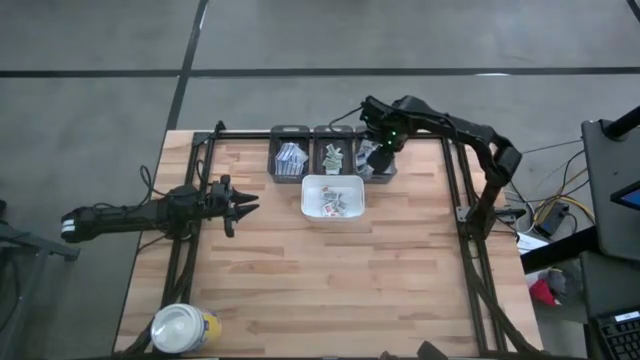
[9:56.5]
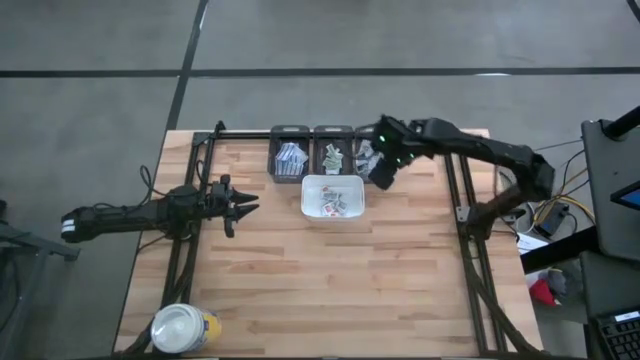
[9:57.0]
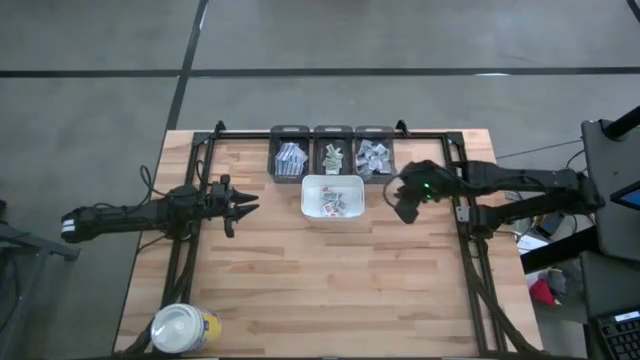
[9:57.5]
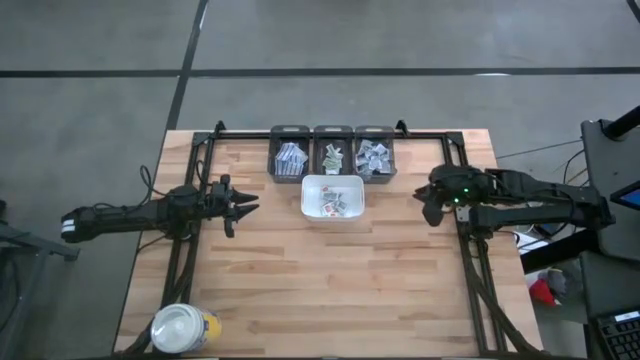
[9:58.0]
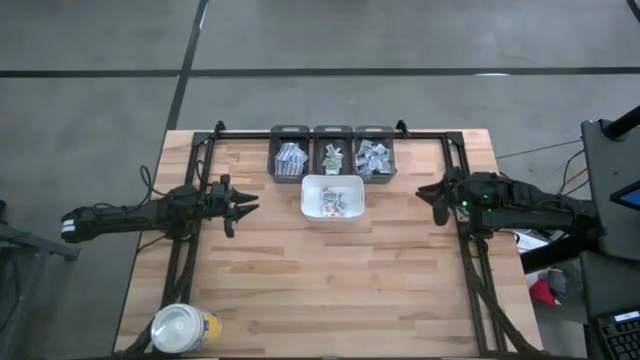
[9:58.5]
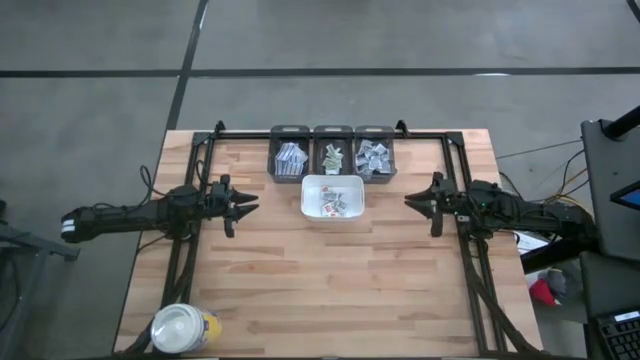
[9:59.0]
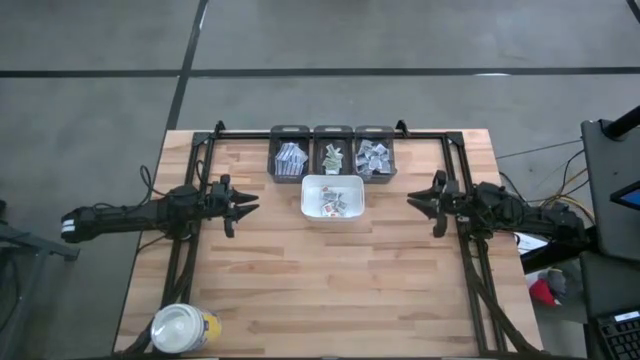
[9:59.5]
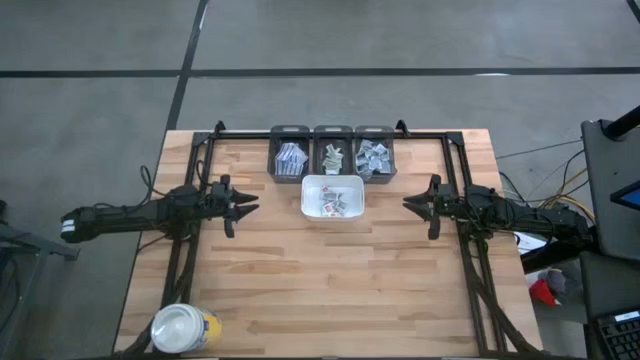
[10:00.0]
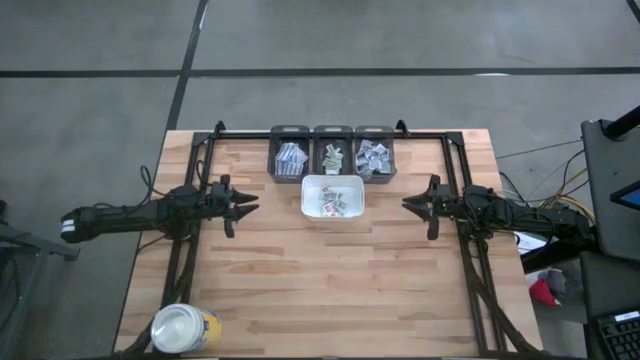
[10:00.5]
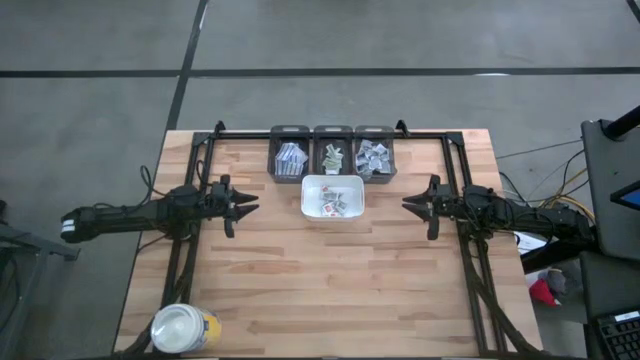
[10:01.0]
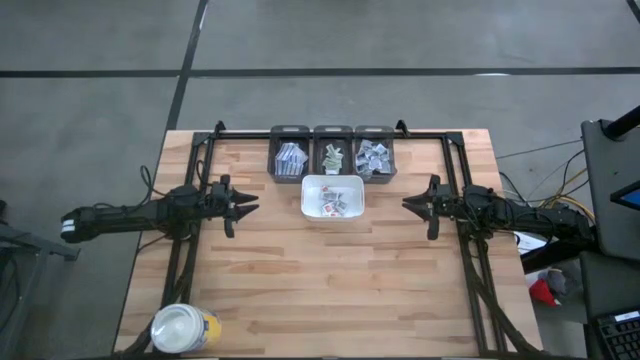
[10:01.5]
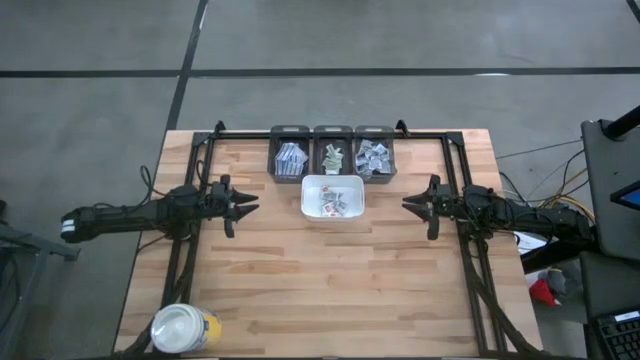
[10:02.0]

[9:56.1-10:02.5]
Task: Pick & Place First Aid Supplies
Return to Home Position

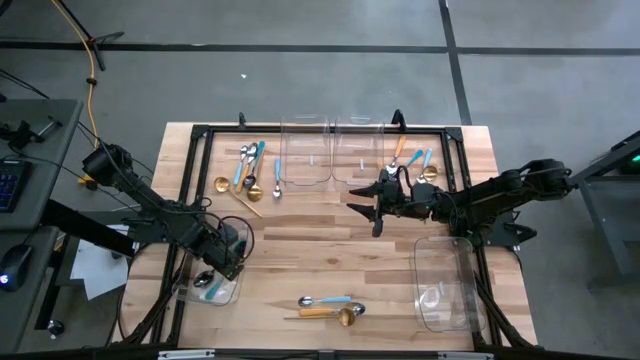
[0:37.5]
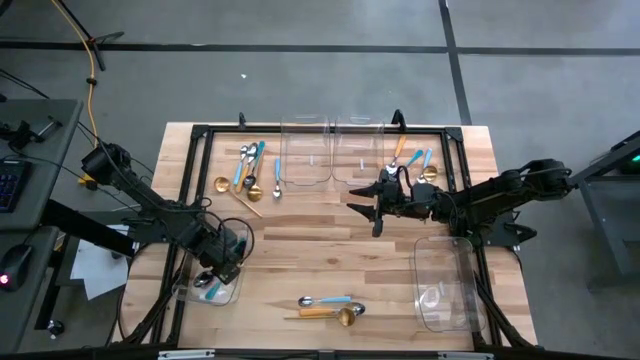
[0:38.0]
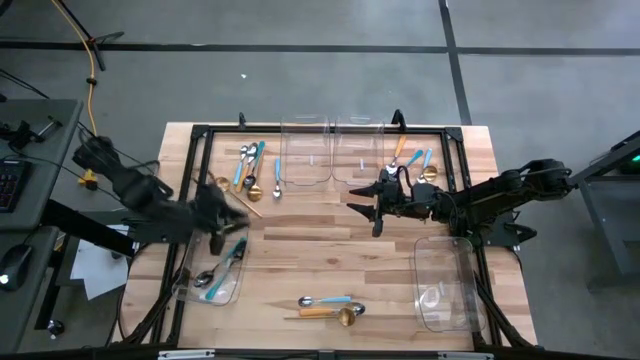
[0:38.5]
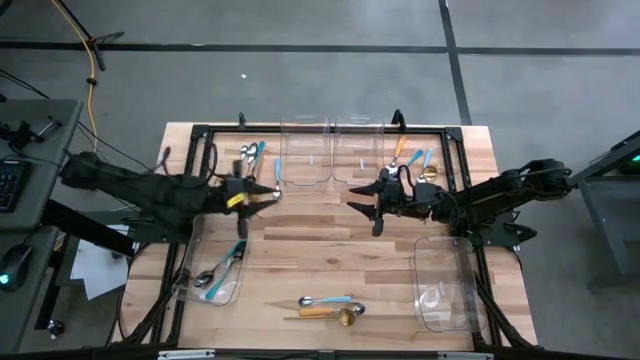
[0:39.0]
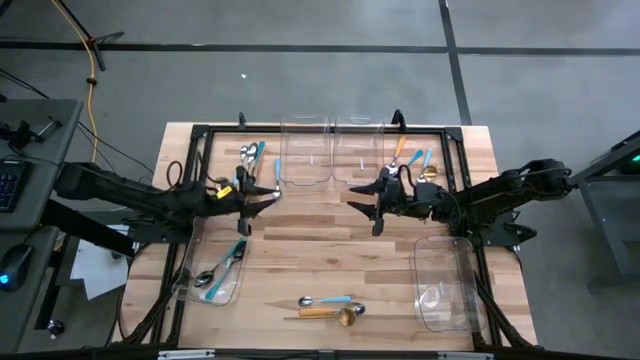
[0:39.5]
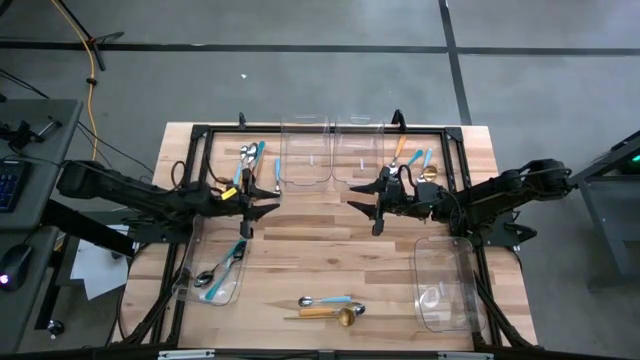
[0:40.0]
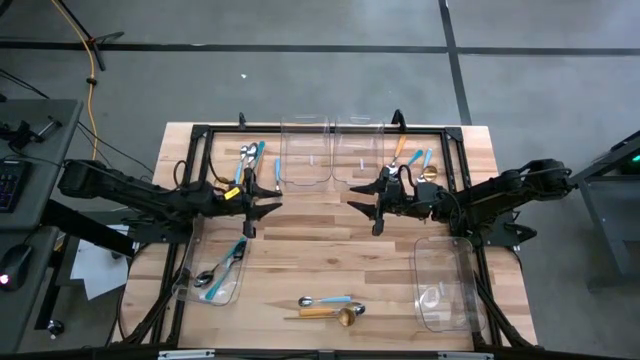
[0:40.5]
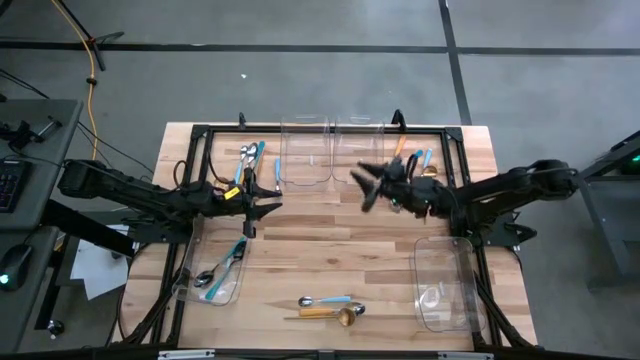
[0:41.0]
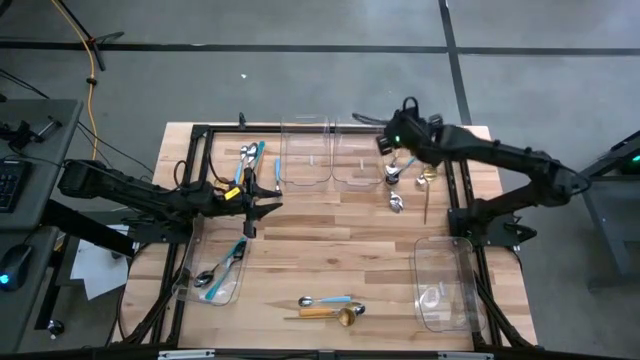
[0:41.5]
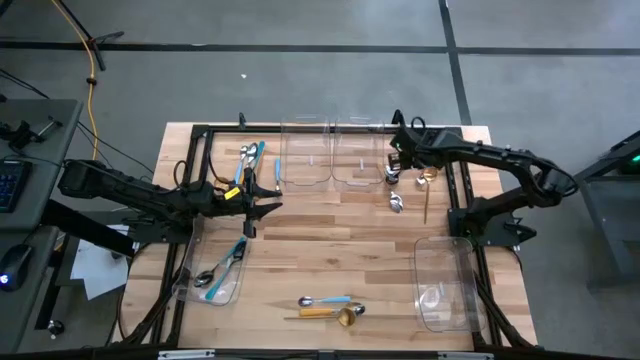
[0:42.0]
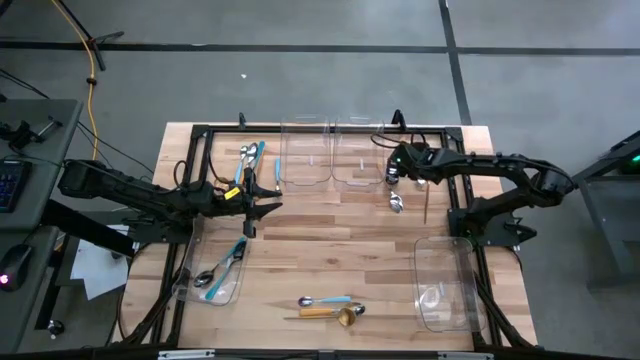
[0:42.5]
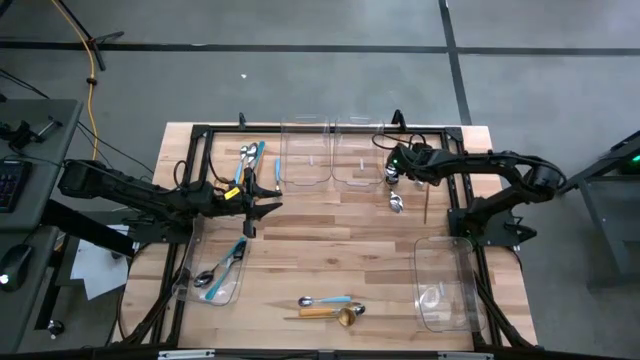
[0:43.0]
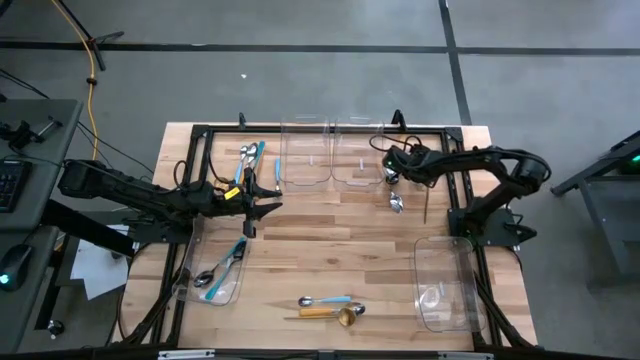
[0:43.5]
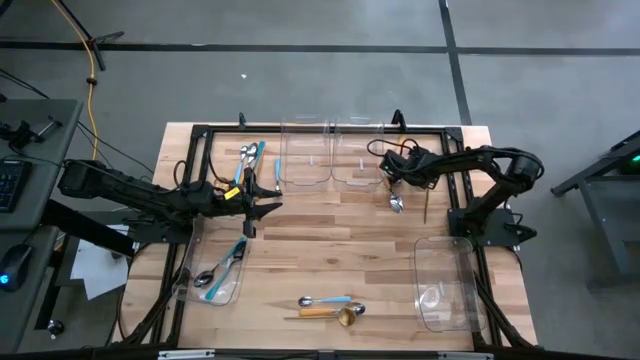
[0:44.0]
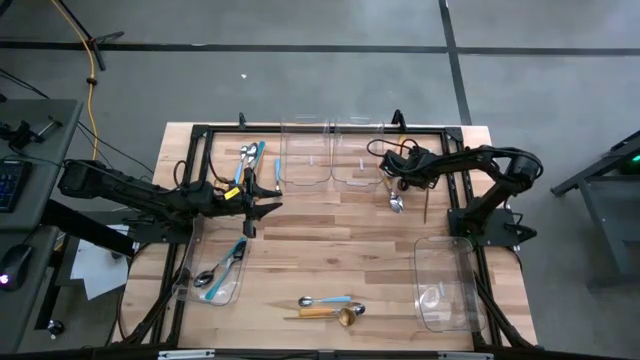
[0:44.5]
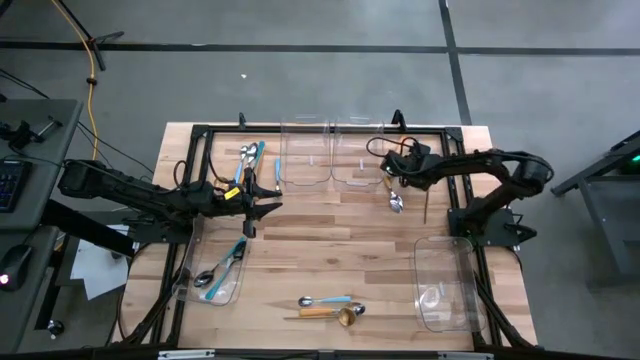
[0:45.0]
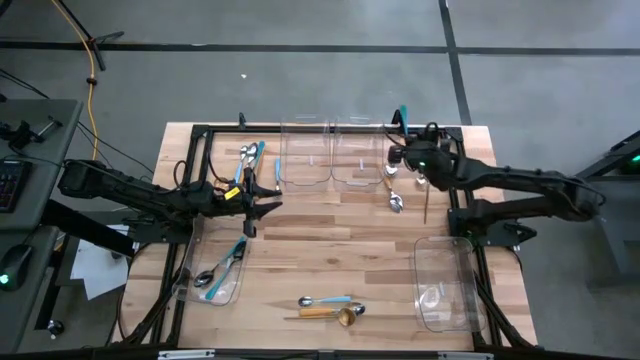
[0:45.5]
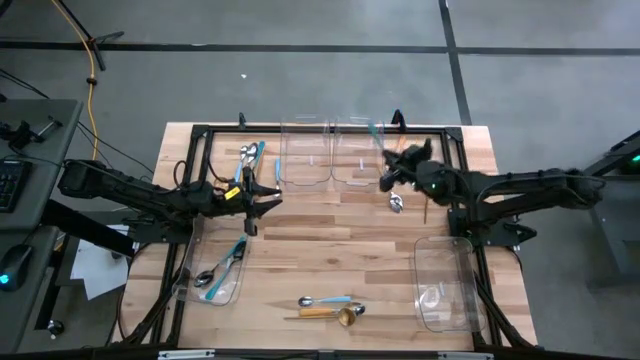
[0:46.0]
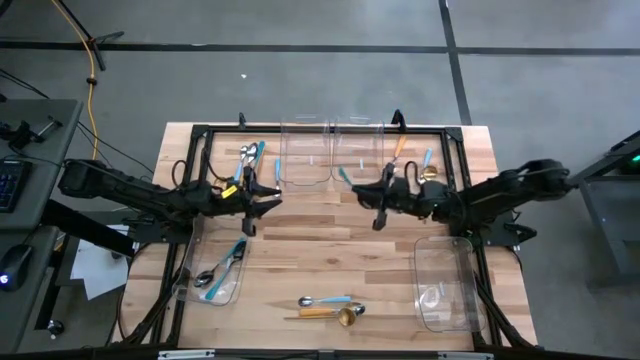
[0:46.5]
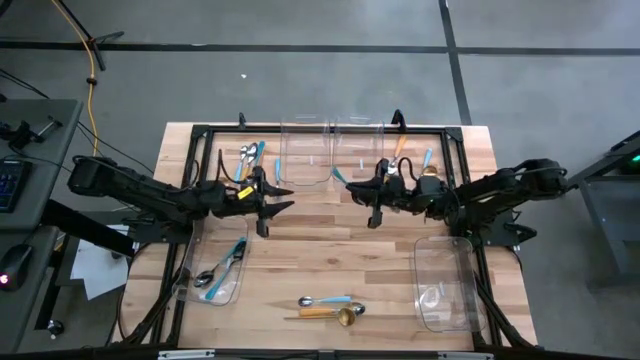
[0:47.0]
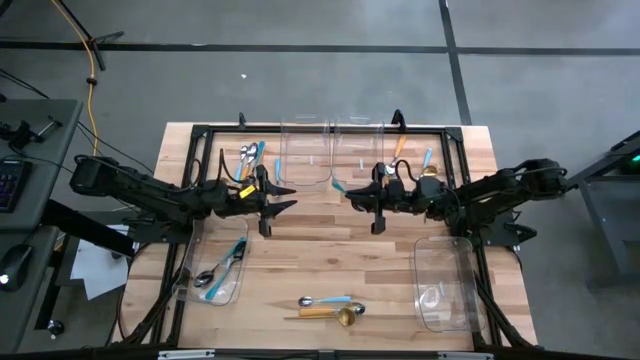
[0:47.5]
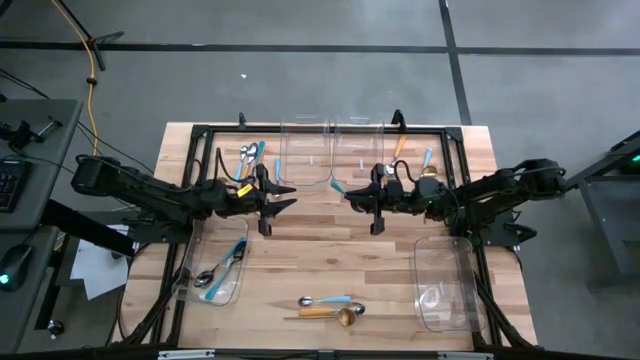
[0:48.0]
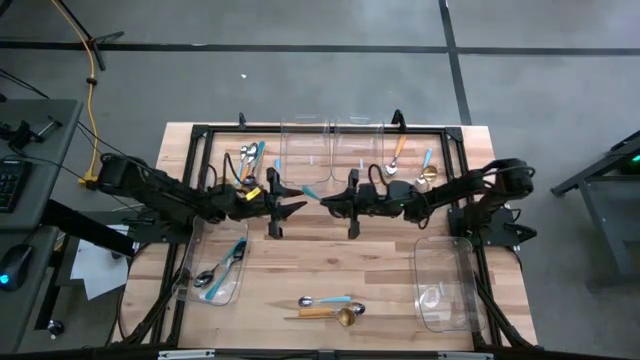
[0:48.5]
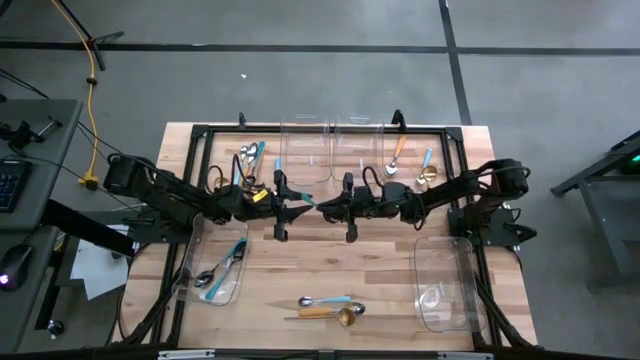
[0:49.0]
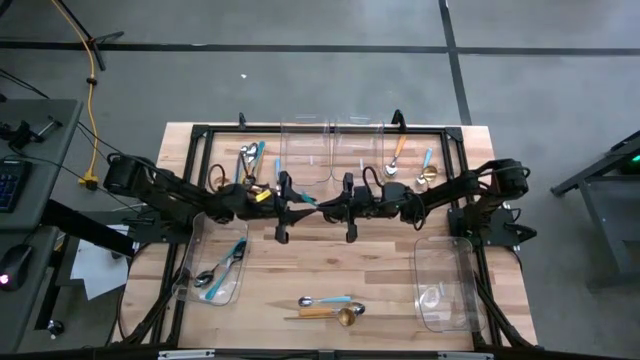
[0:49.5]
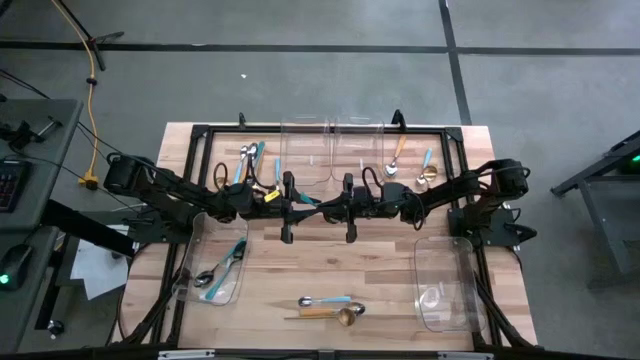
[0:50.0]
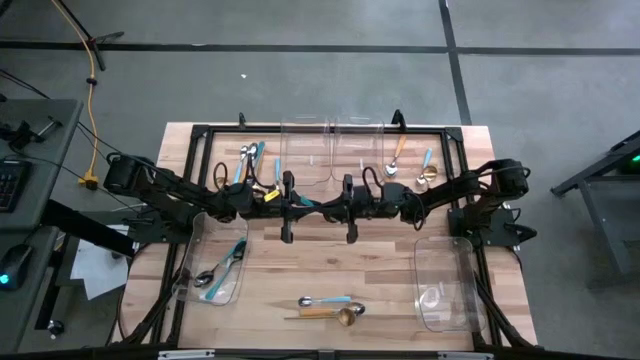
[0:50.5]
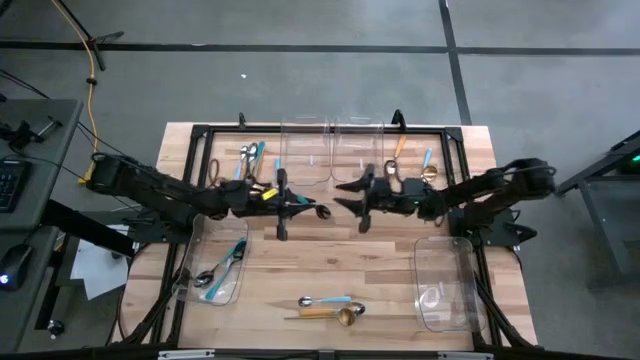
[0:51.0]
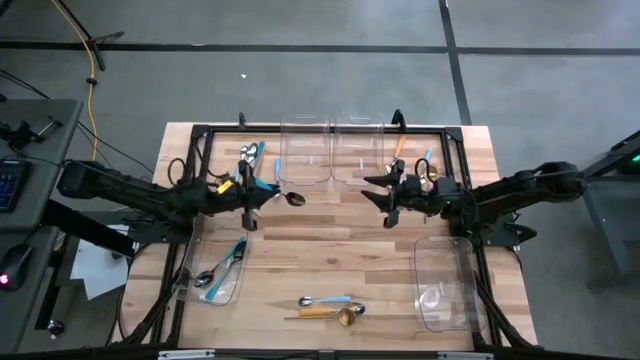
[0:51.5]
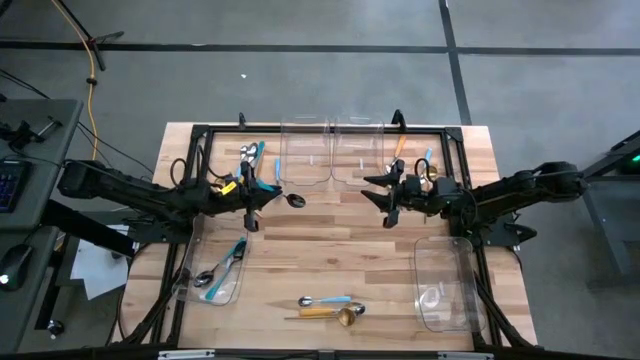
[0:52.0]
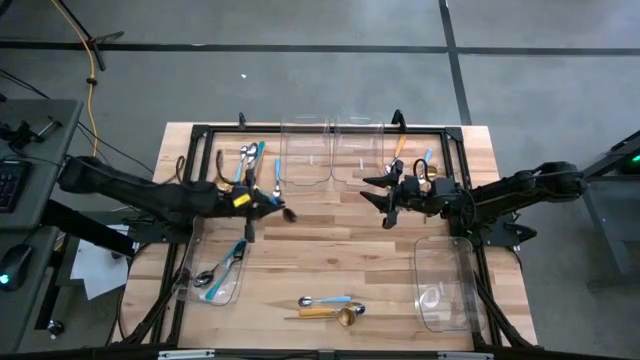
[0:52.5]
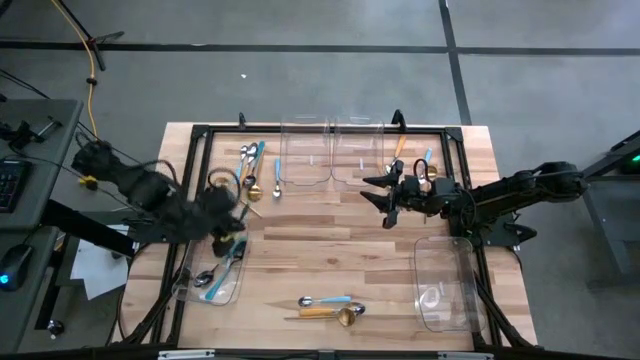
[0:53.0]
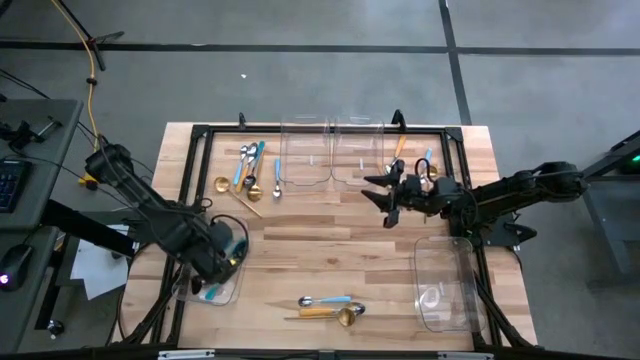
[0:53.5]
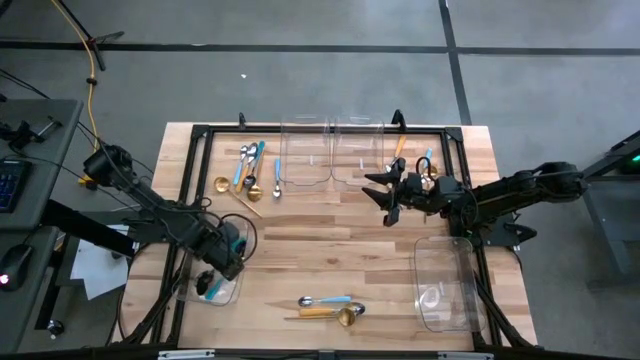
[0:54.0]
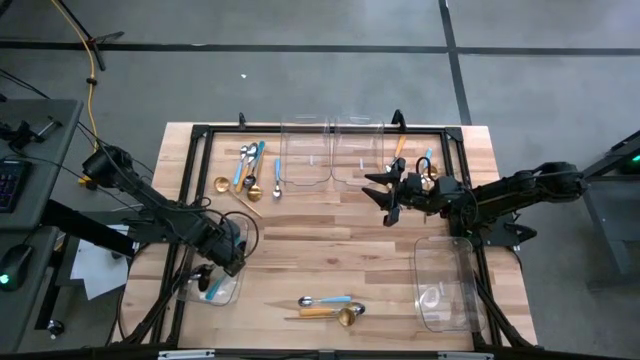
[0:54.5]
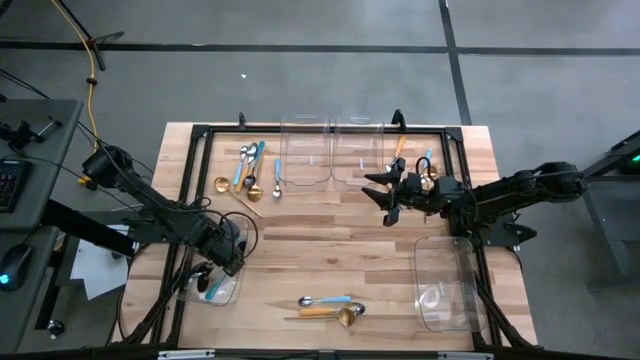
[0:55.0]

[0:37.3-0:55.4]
Task: Sort silverware by color (type)
Put the black spoon into the bottom left transparent bin
